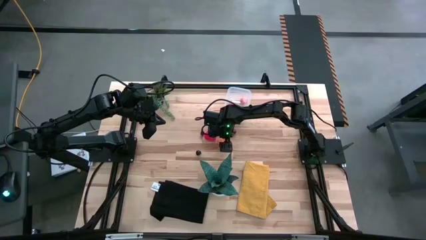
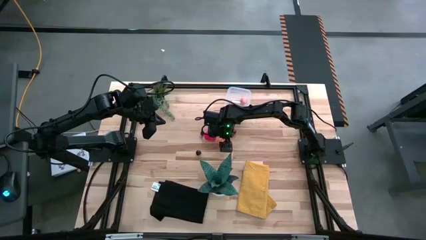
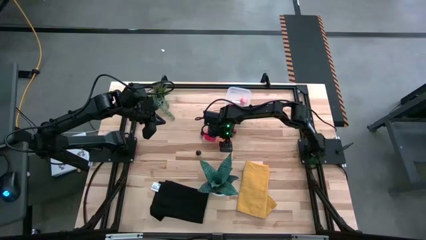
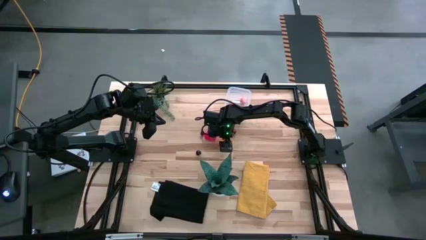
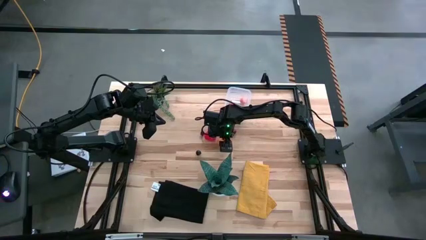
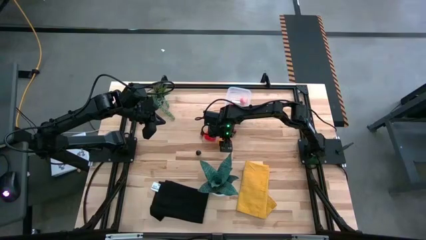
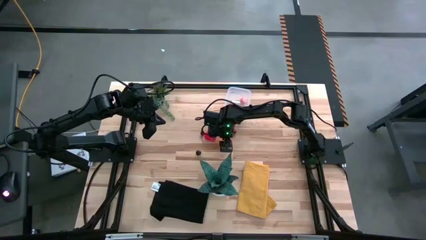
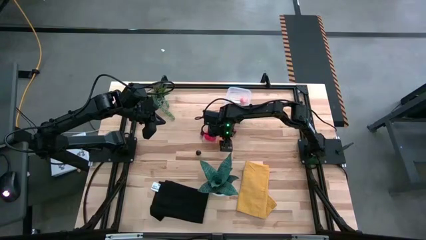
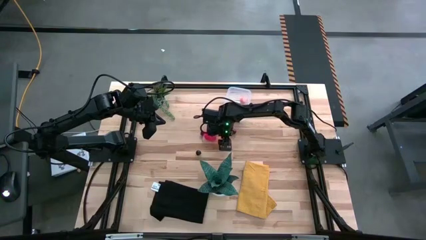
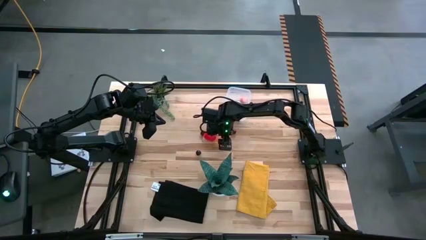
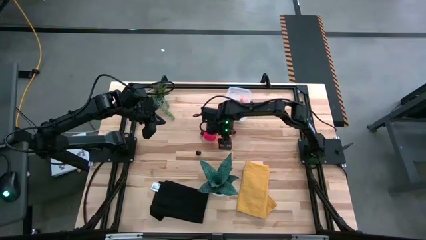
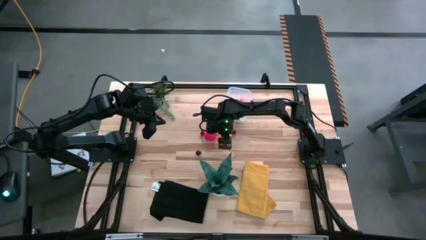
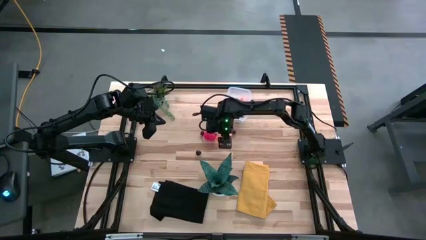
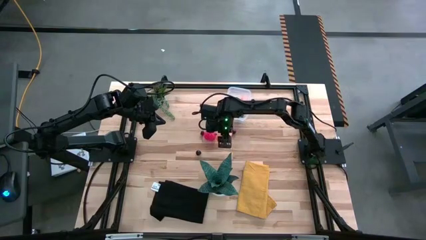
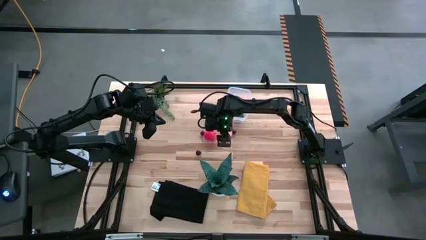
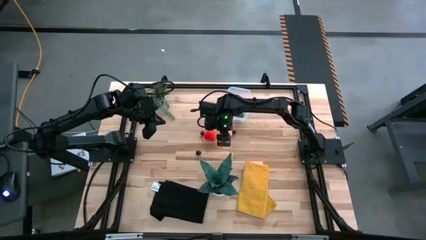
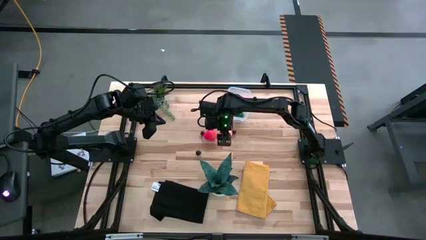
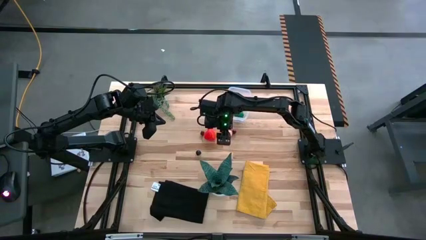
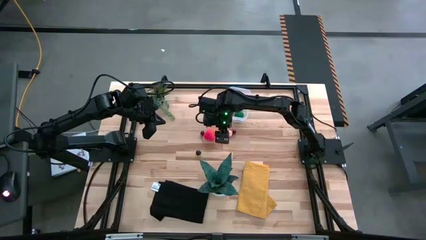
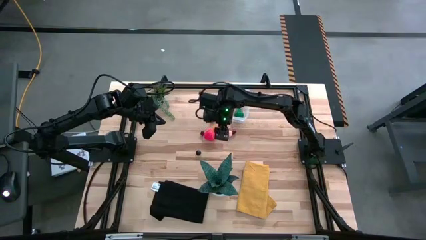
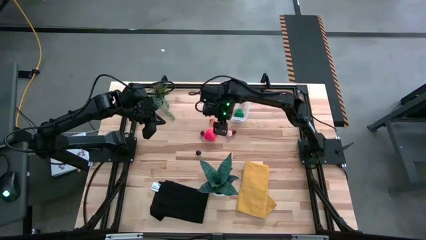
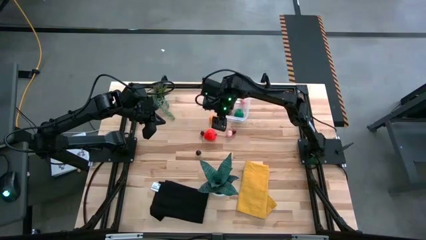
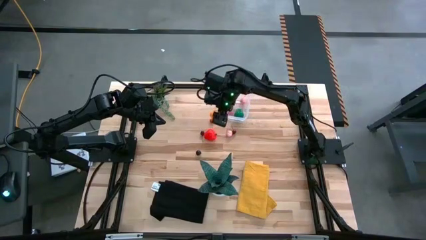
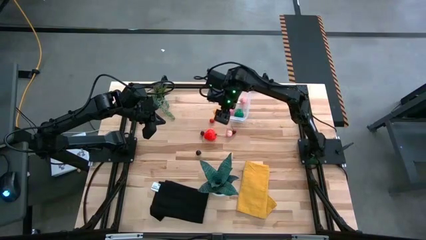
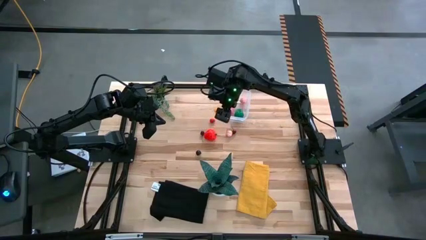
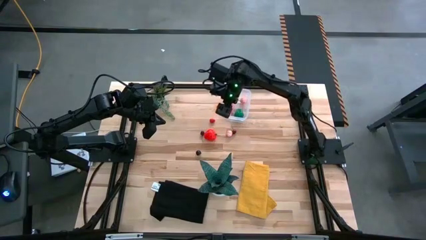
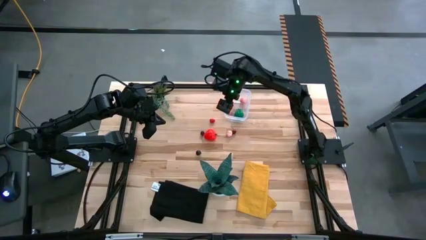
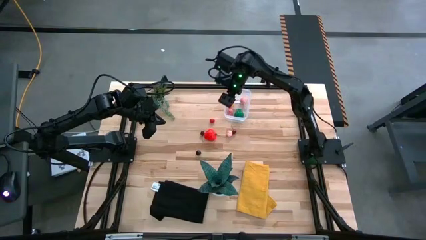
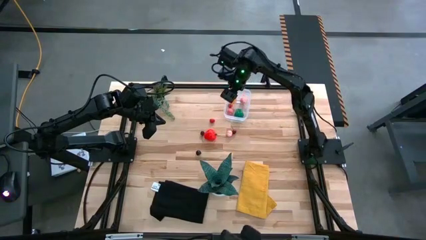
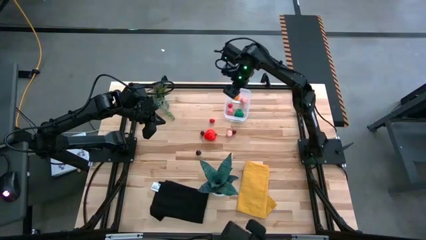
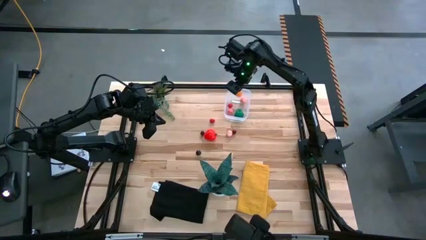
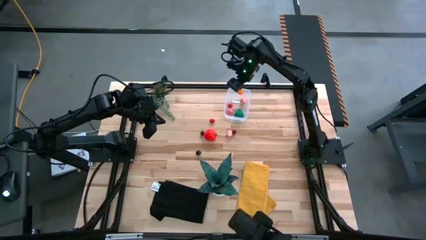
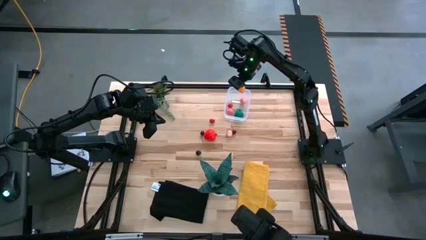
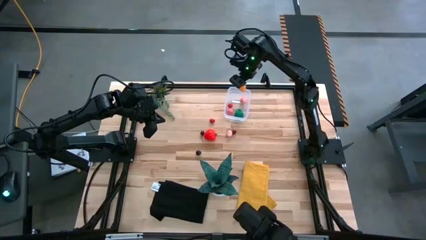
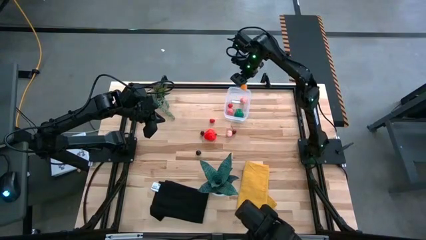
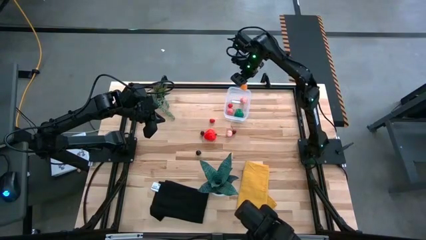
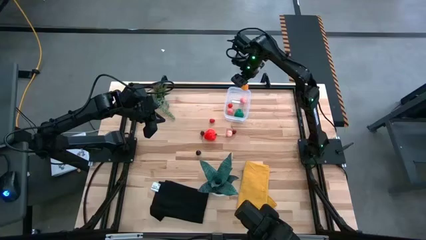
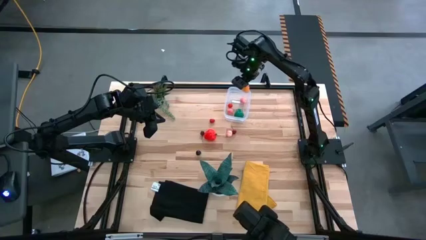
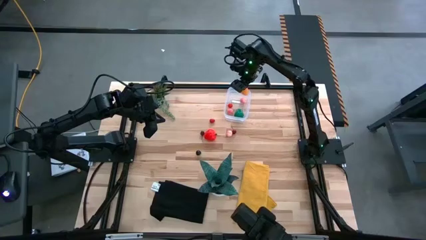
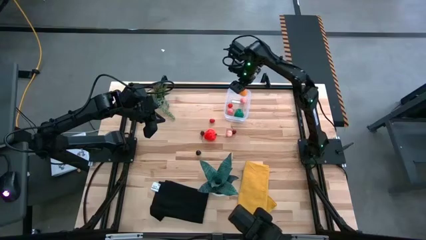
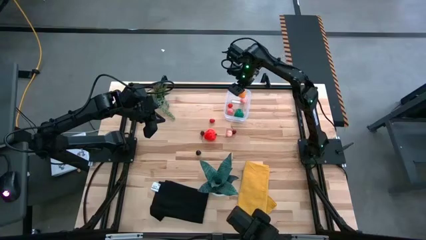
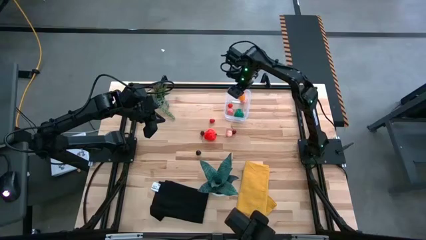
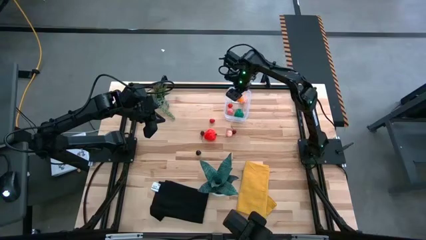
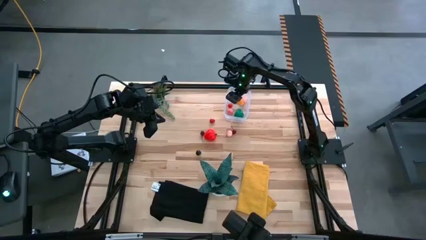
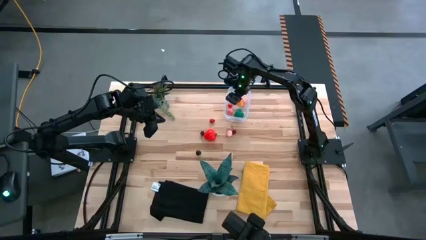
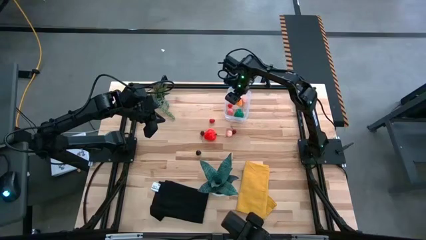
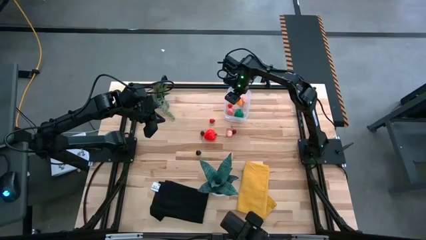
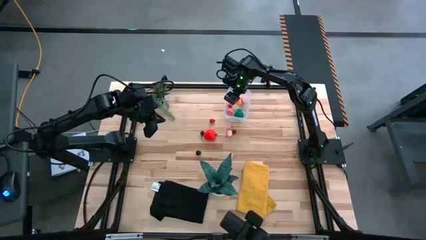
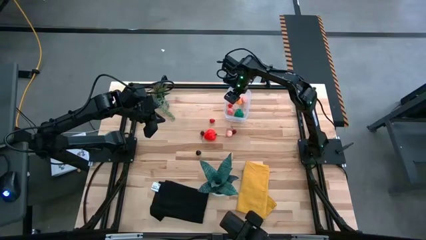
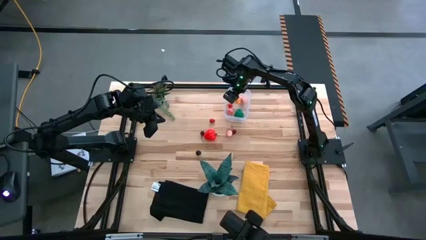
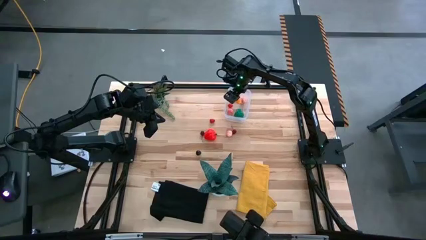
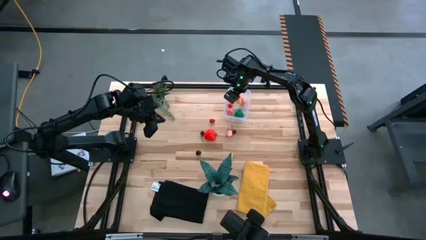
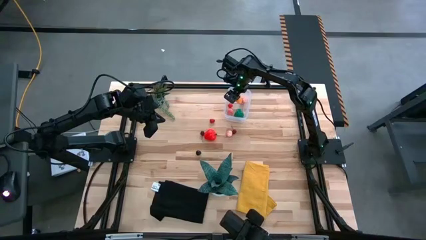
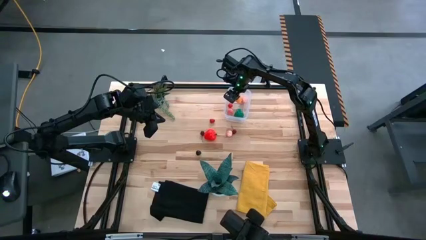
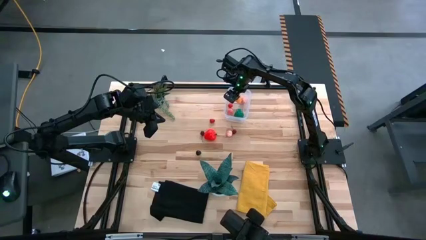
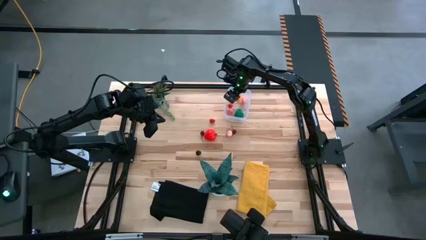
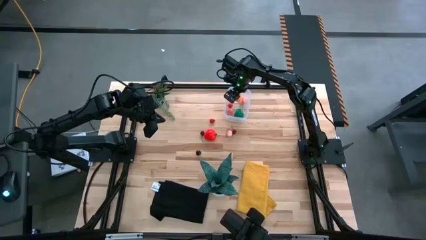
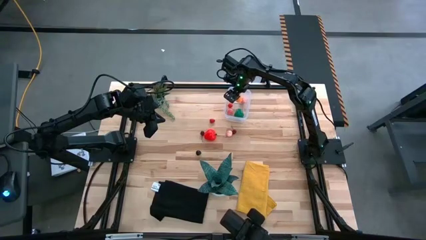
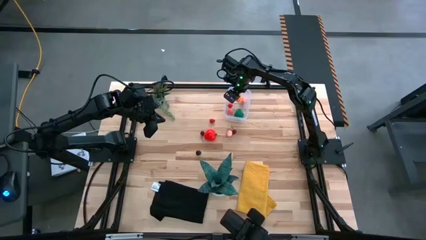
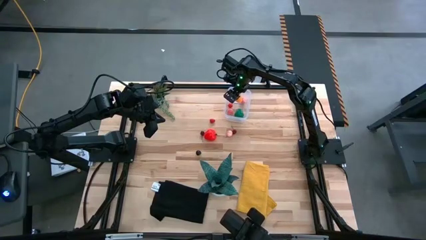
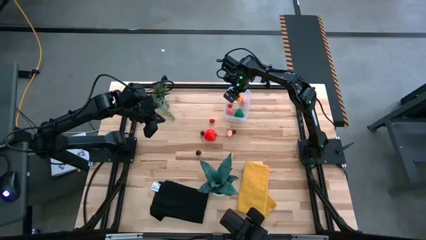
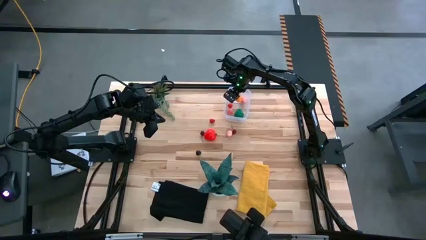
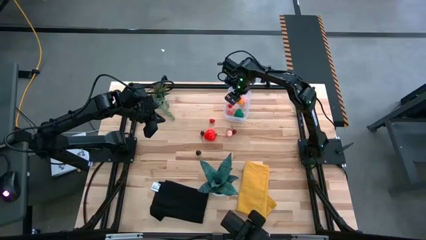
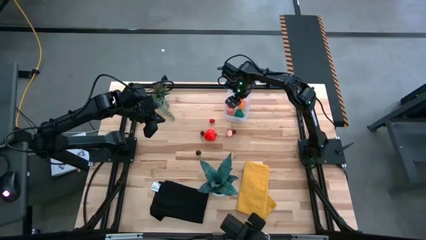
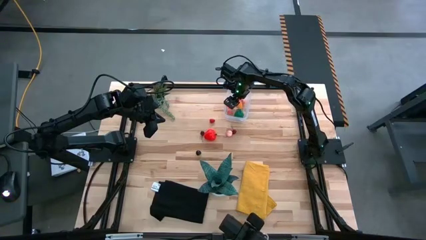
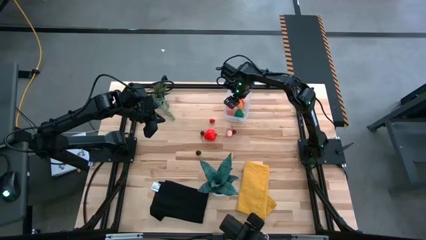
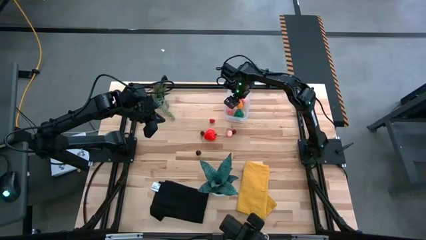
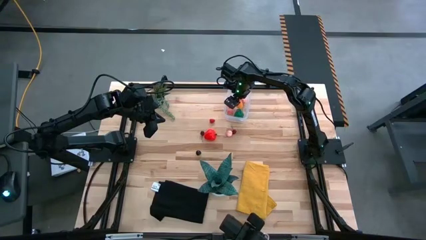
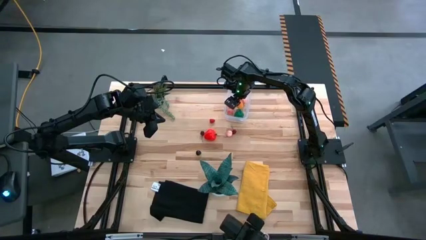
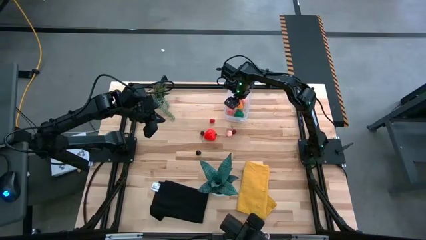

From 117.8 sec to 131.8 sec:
Task: Pick and placing Produce into tupperware
Put the croissant into the transparent container

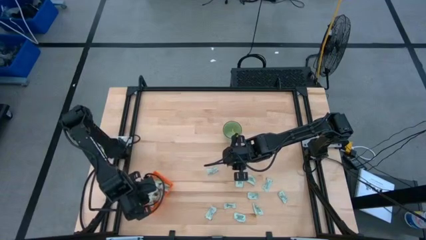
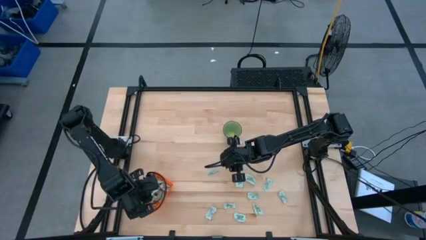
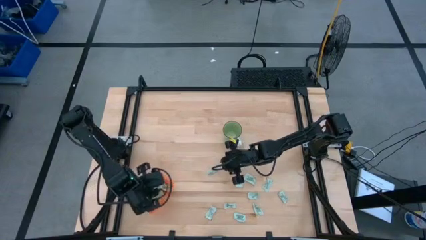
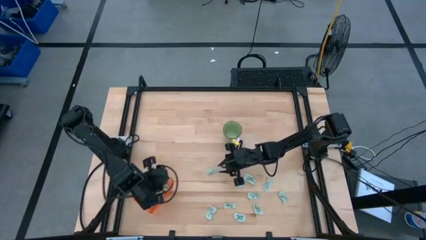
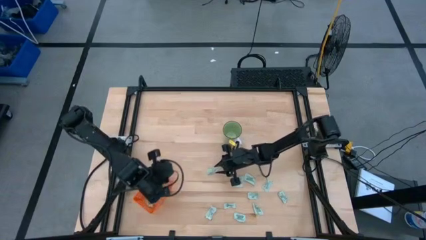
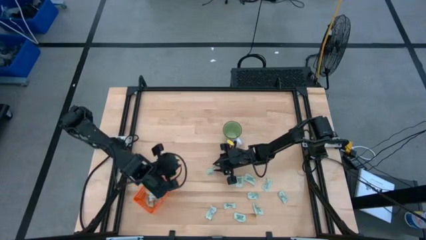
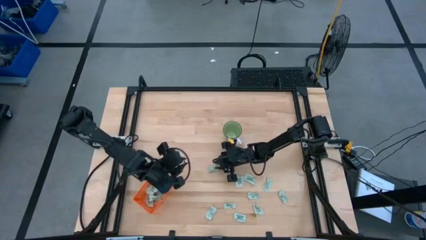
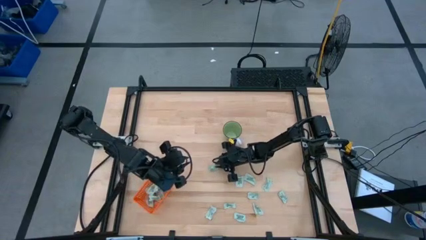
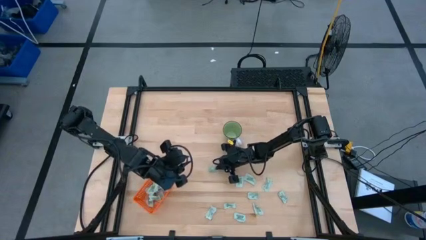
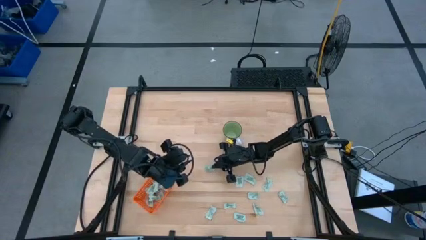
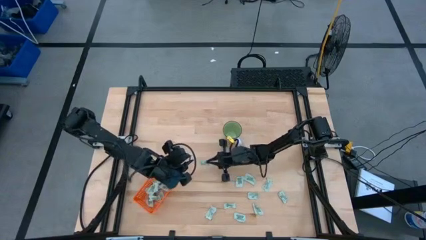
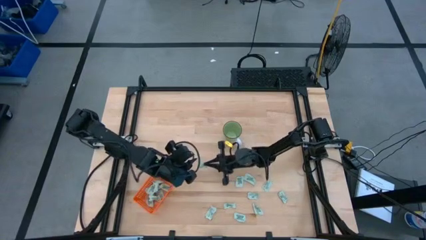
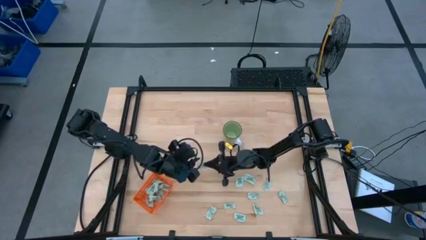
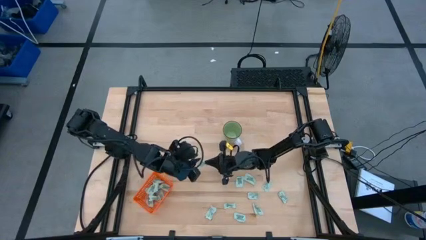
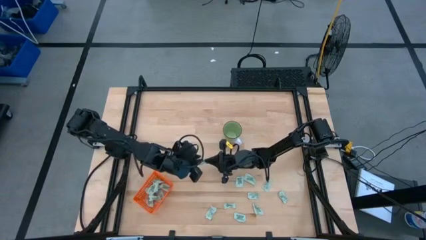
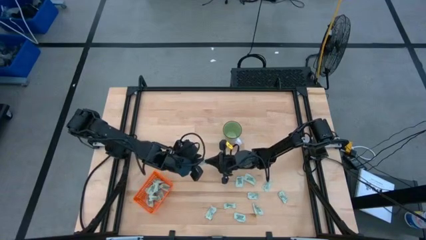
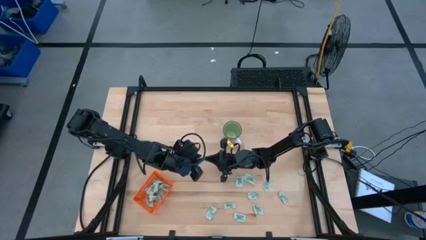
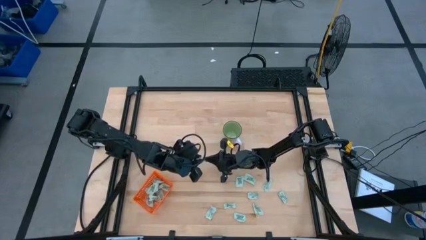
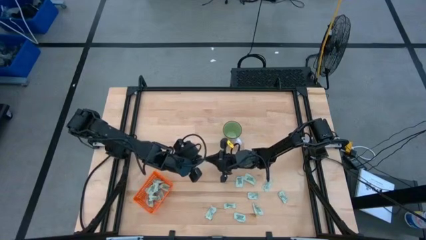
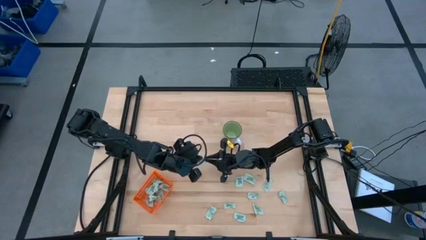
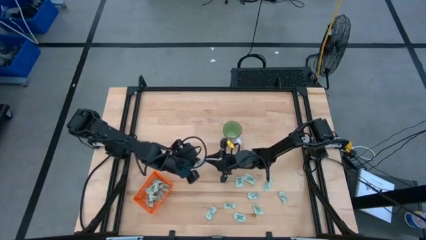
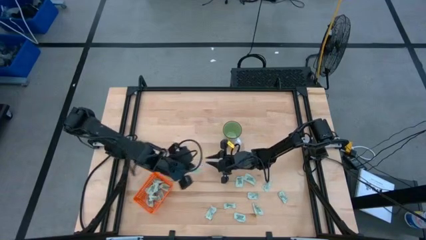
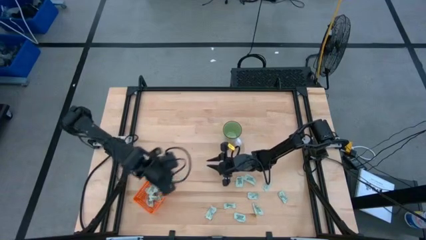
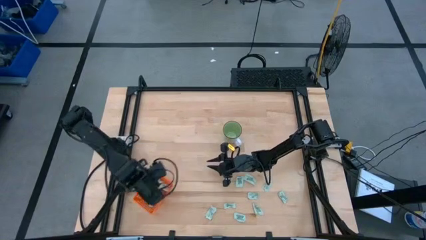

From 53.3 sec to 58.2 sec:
Task: Pick and place Stevia / Truvia into bins
Put the light green stevia packet into the orange basket
